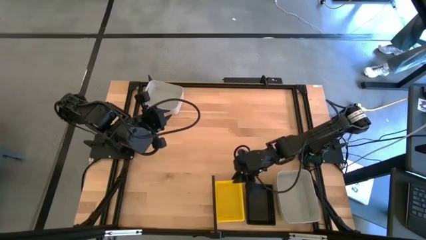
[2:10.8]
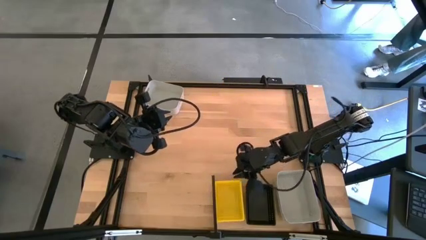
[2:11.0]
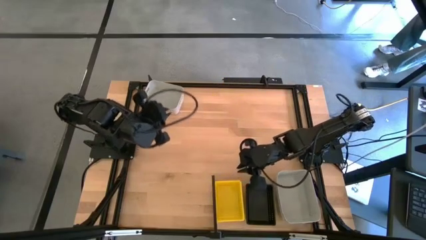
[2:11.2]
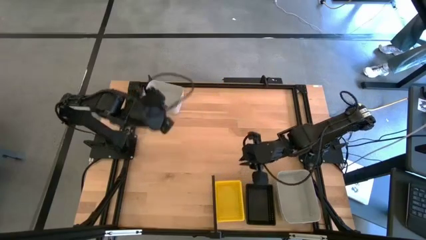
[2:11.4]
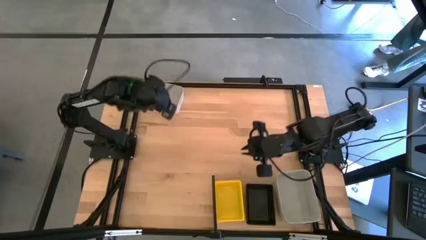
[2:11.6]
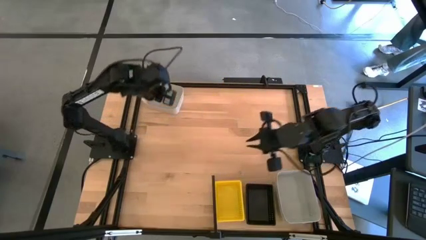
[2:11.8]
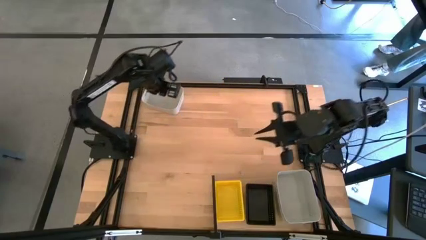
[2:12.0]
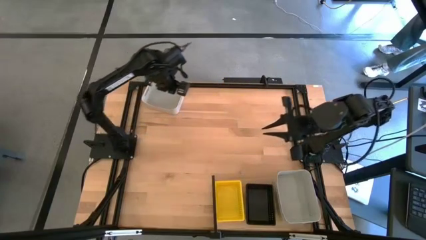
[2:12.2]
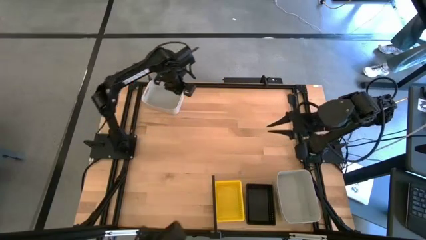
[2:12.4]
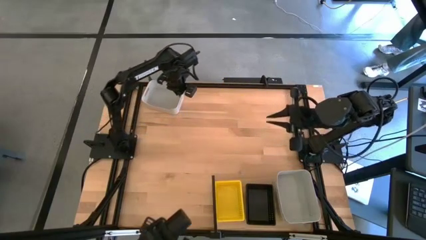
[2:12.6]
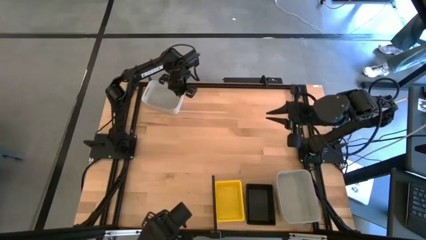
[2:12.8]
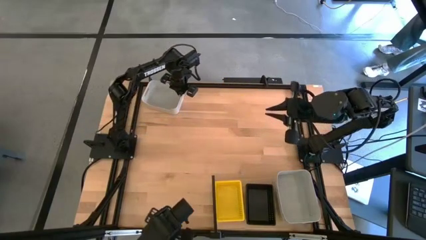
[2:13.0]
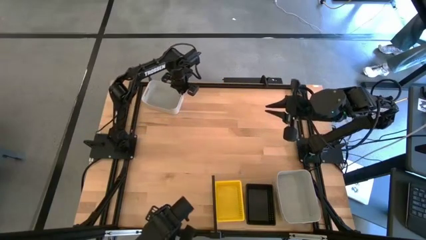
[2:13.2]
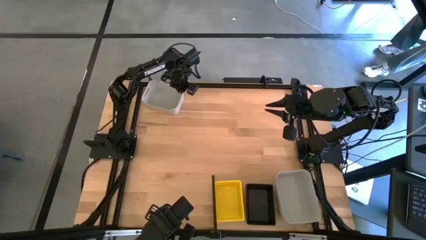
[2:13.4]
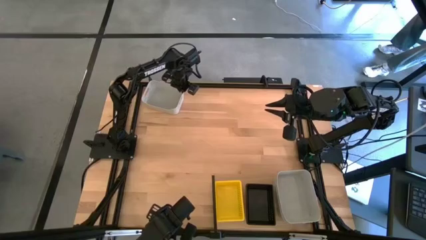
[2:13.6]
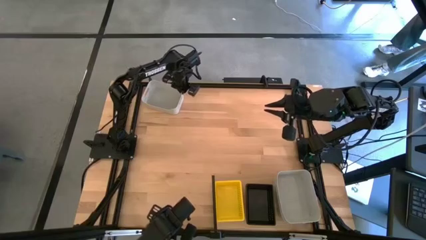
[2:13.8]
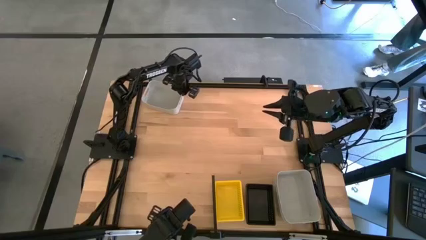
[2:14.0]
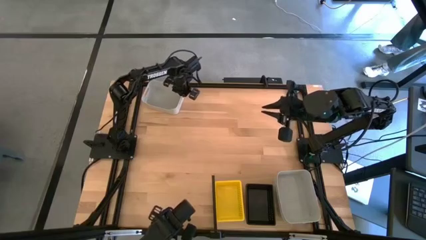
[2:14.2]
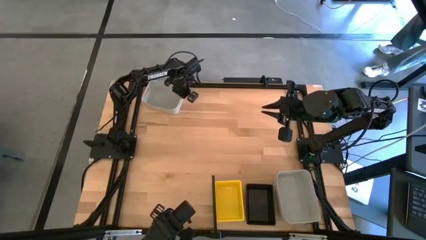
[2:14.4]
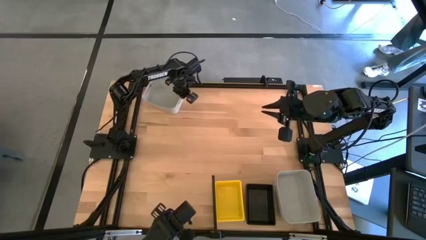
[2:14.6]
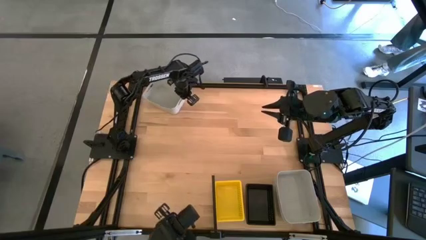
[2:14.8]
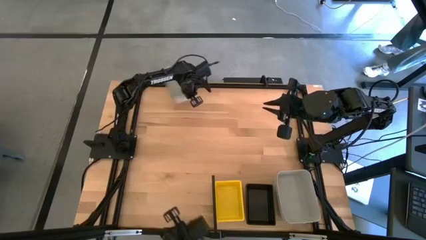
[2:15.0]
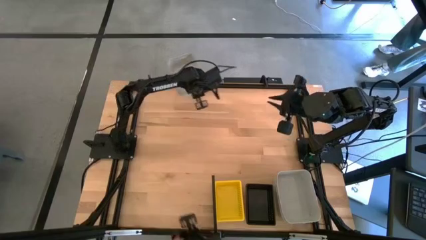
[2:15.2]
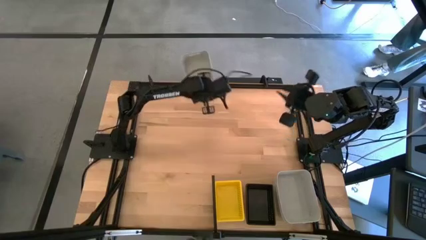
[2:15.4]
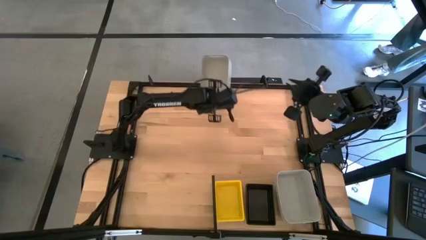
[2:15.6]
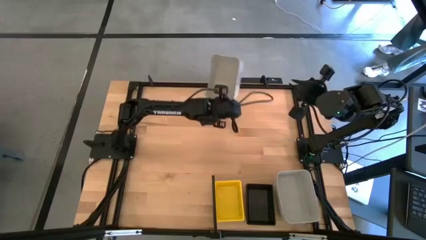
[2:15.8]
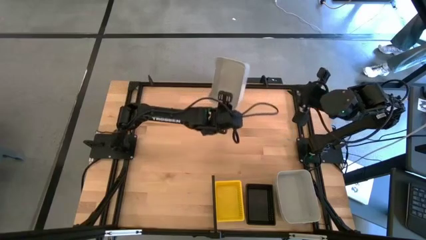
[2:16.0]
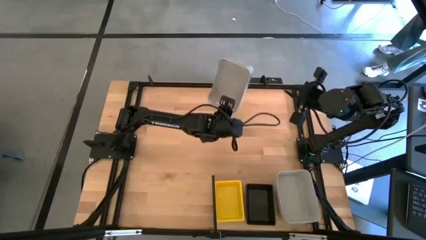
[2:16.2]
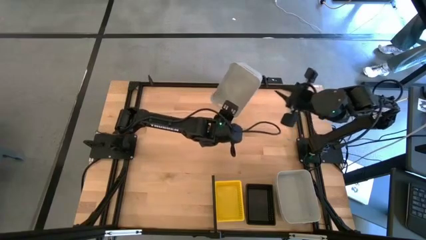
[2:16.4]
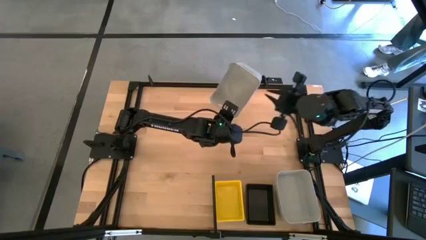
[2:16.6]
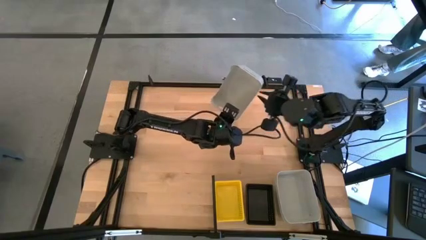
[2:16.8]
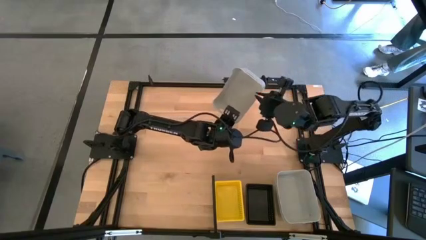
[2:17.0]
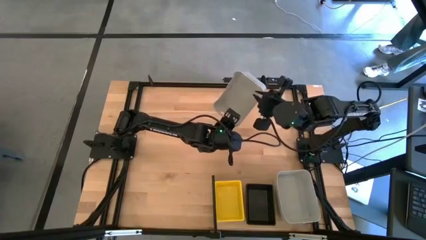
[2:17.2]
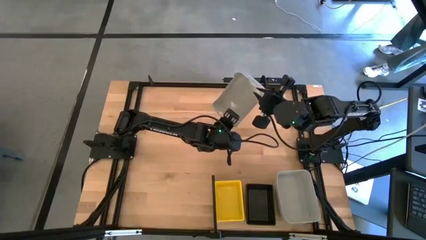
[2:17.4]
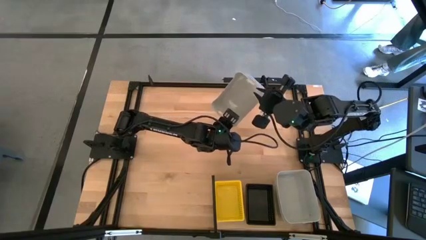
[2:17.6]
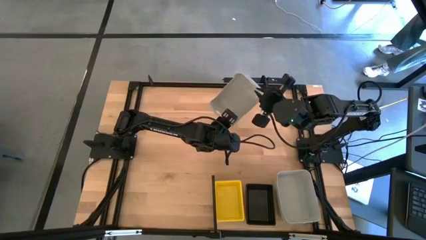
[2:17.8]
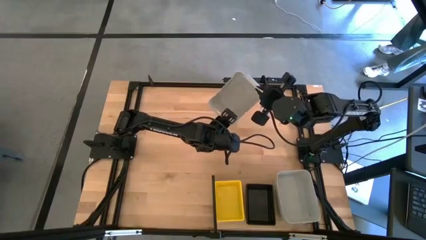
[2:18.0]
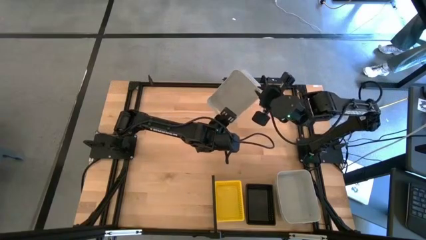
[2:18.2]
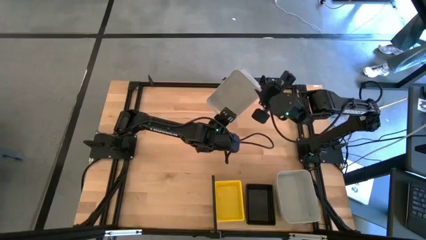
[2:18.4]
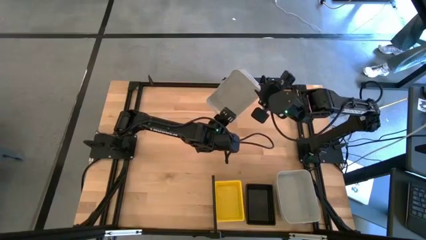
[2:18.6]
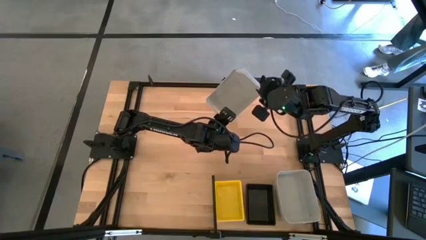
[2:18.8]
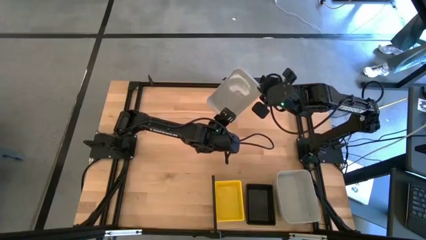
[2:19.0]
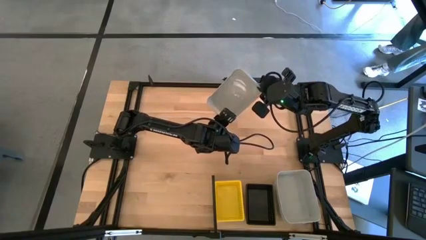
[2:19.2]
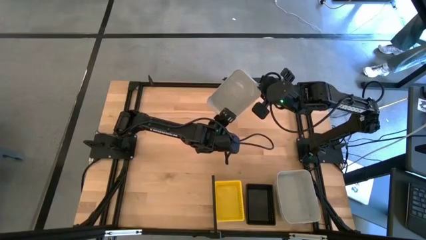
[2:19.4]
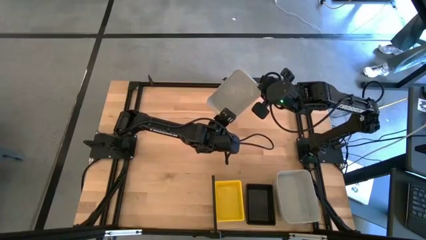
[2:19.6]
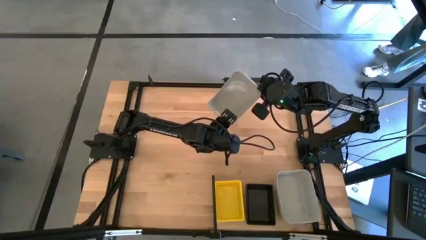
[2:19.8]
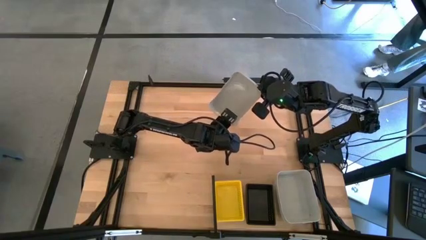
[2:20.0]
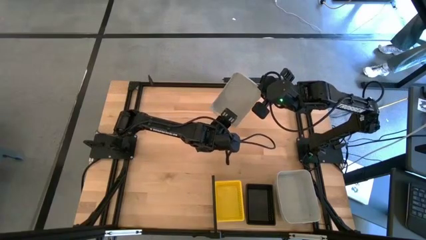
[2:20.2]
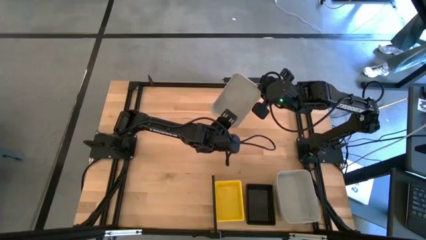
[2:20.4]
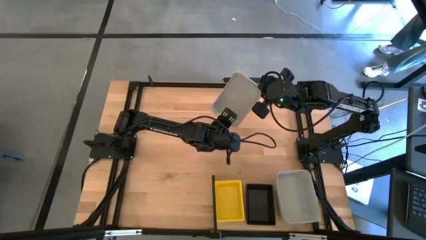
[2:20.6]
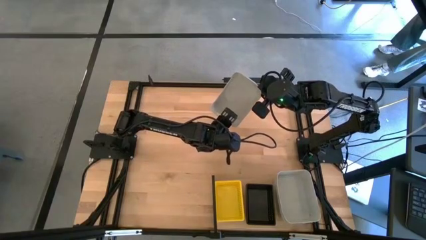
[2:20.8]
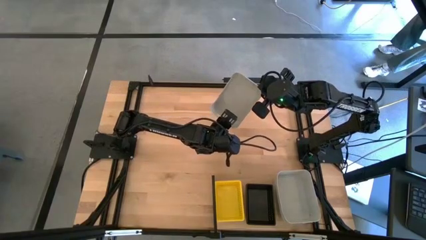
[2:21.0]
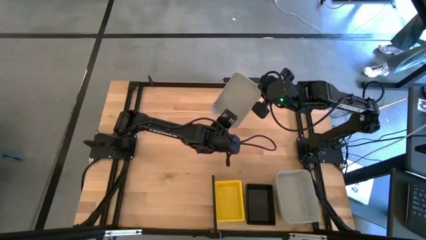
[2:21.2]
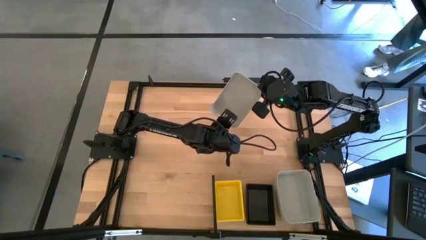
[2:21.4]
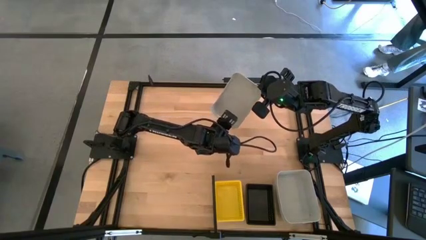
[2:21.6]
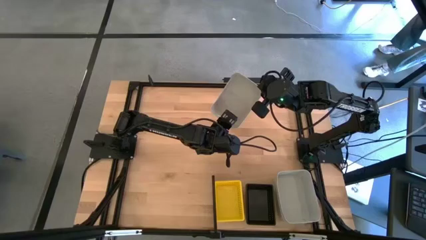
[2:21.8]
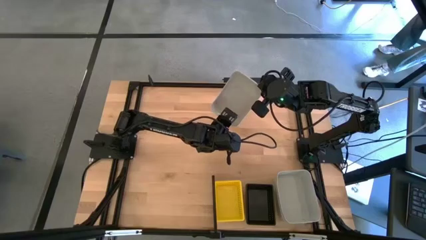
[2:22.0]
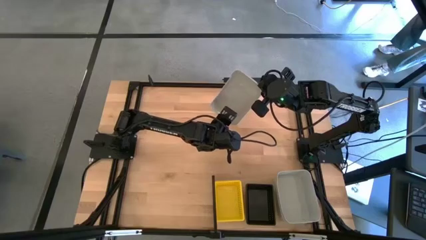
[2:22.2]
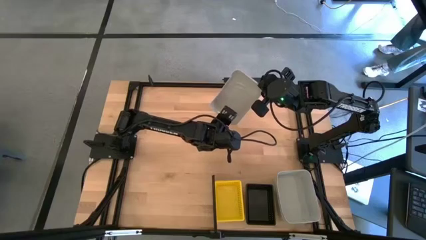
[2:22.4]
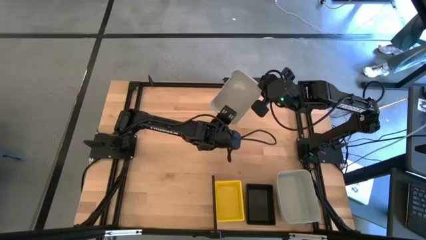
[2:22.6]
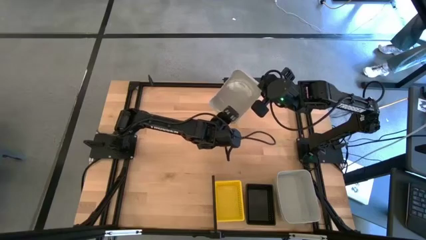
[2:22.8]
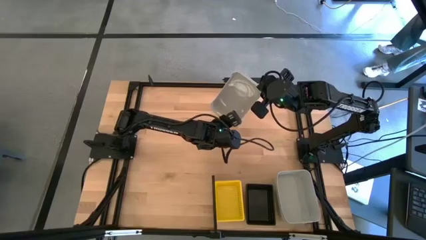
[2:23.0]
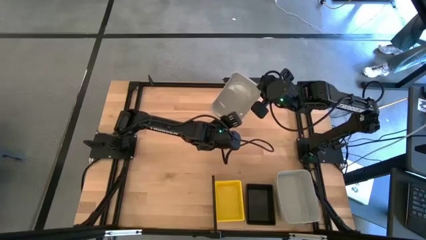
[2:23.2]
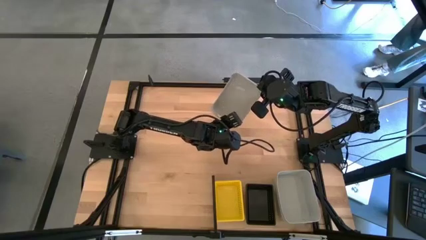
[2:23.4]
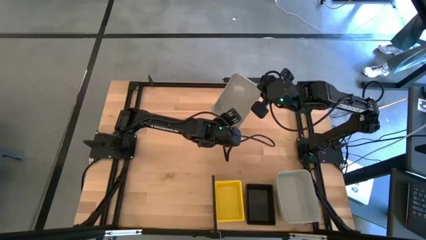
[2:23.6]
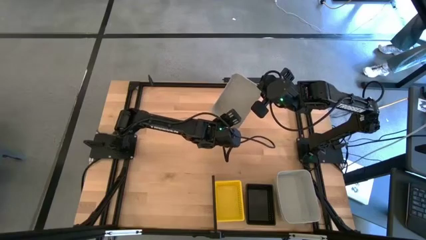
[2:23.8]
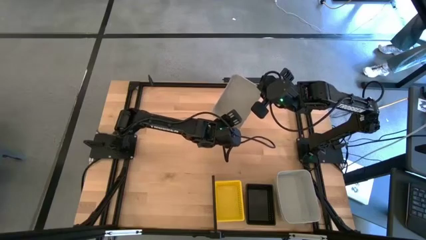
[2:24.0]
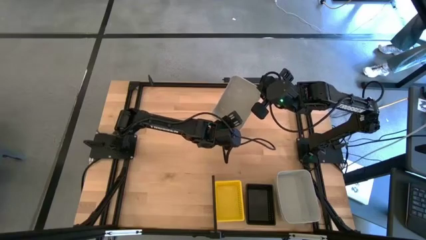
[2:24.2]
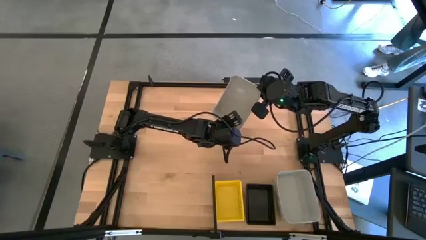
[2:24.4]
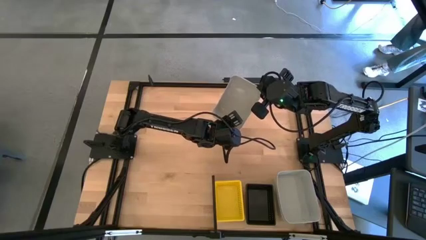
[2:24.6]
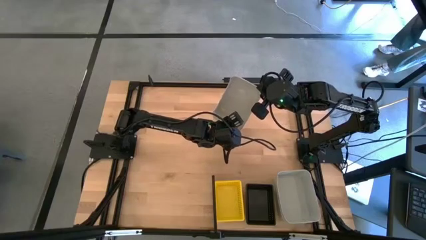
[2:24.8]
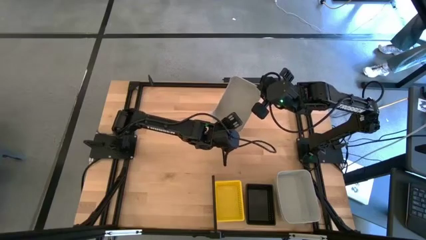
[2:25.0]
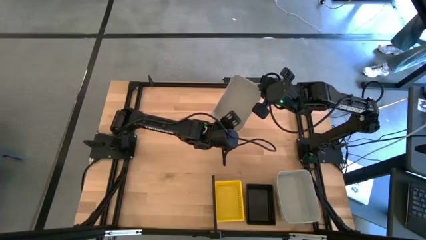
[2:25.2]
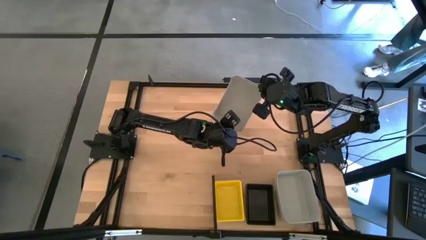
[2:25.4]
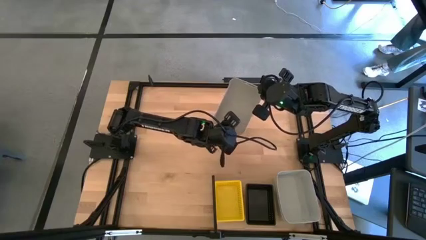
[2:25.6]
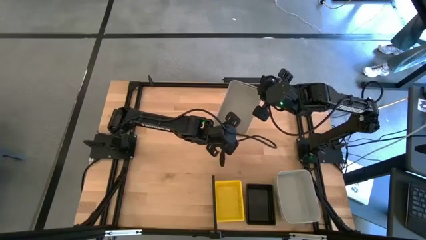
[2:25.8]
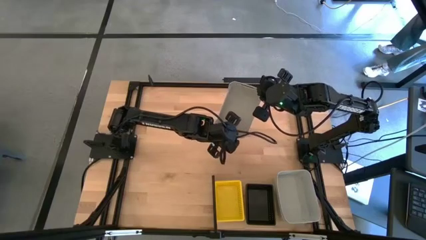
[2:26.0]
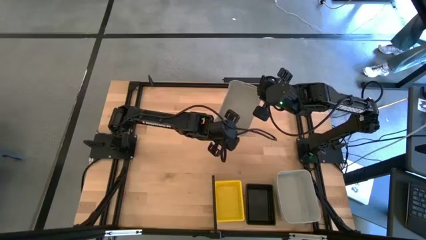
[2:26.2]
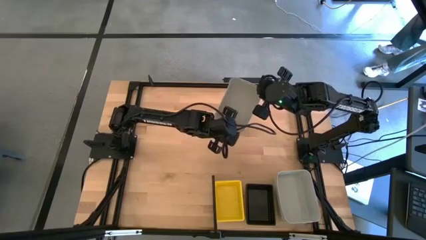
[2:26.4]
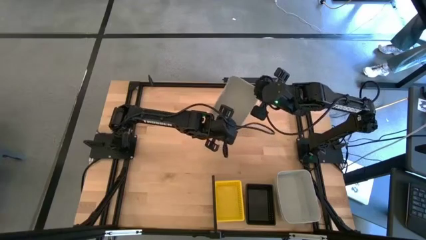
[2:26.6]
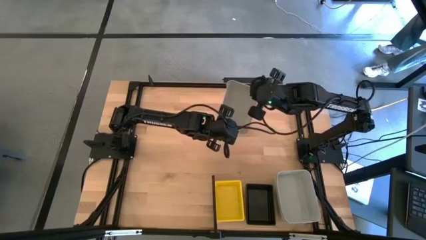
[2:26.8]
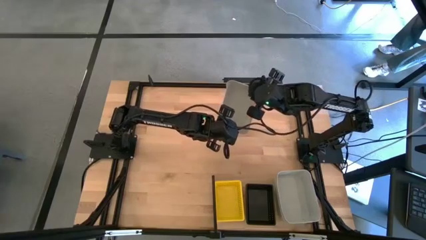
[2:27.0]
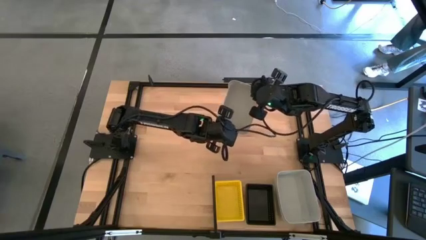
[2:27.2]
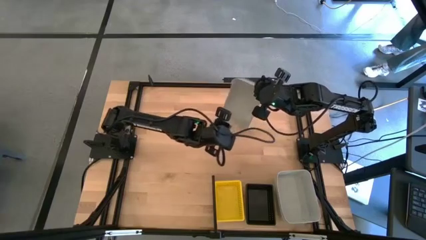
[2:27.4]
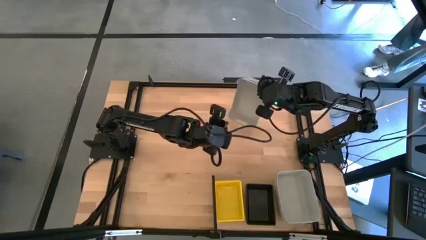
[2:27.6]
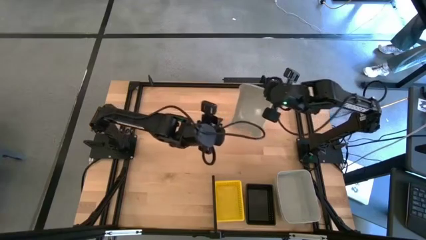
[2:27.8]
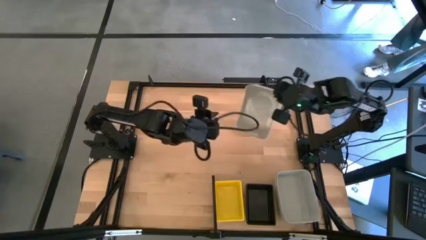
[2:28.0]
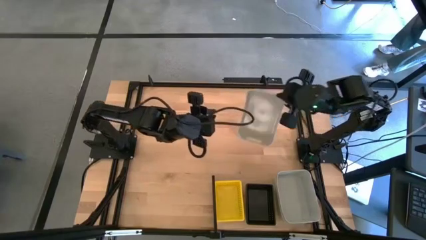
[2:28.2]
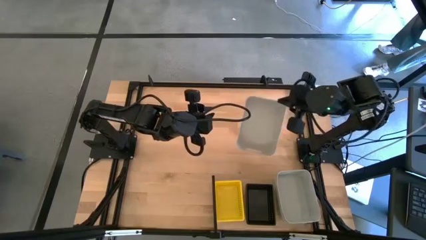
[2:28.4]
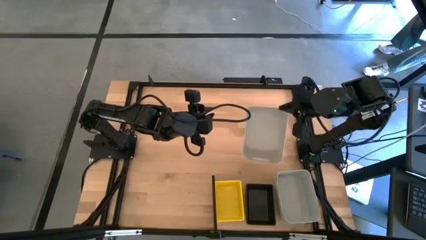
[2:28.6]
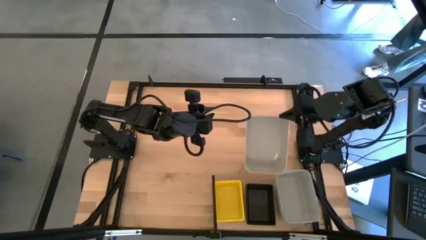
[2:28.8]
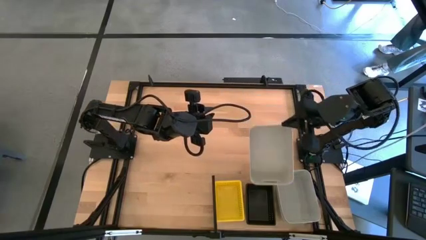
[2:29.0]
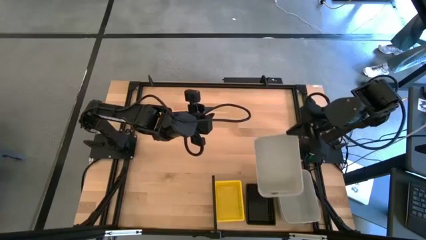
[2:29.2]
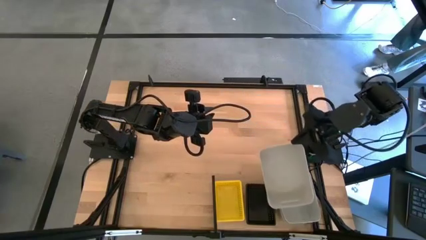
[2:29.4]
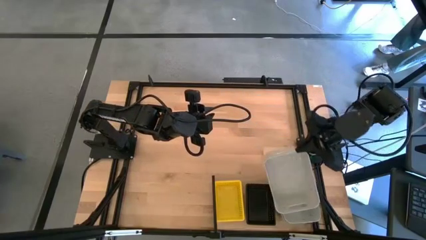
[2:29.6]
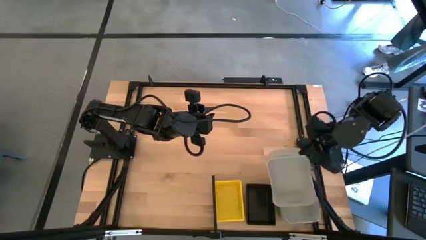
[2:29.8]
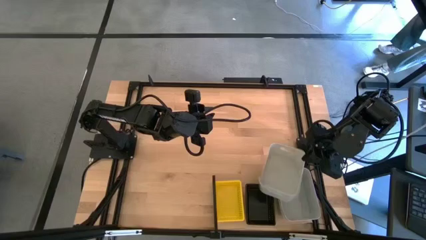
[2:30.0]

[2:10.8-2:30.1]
Task: Stack baskets on shelf by color
Stack the gray bin on top of the gray bin on the shelf
